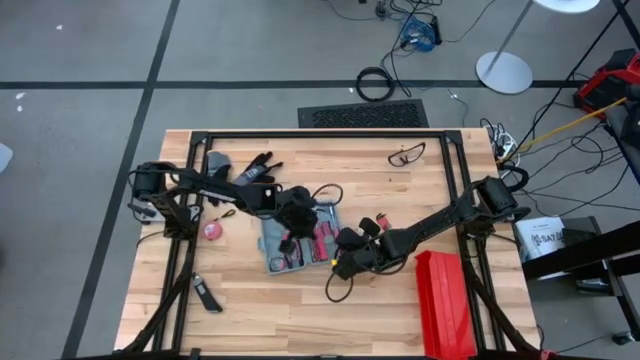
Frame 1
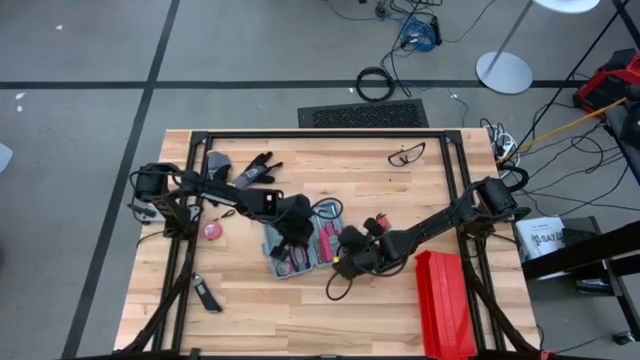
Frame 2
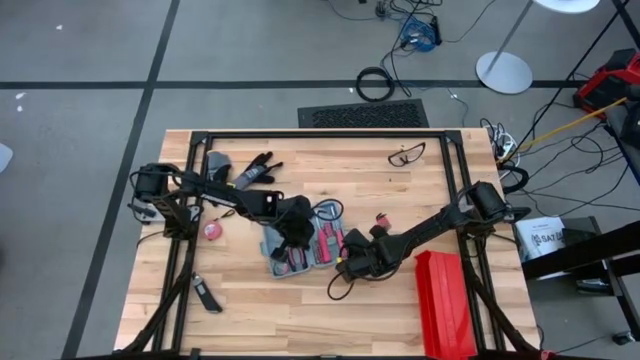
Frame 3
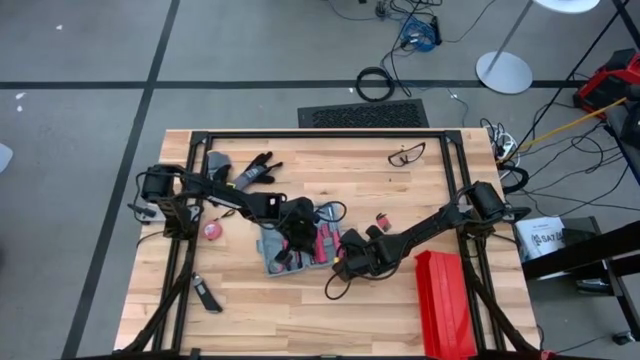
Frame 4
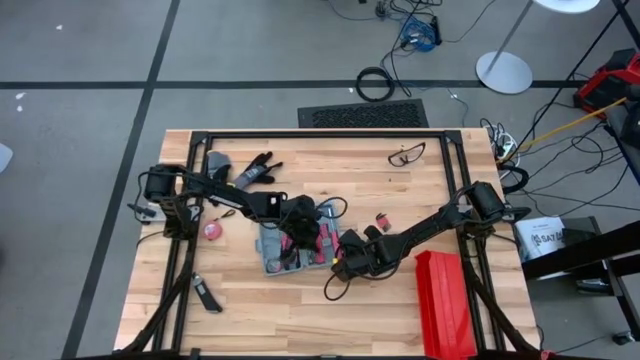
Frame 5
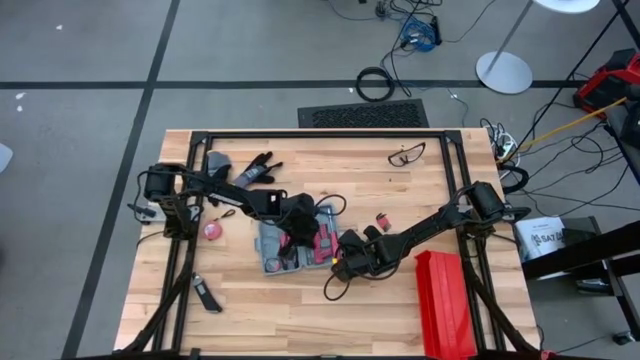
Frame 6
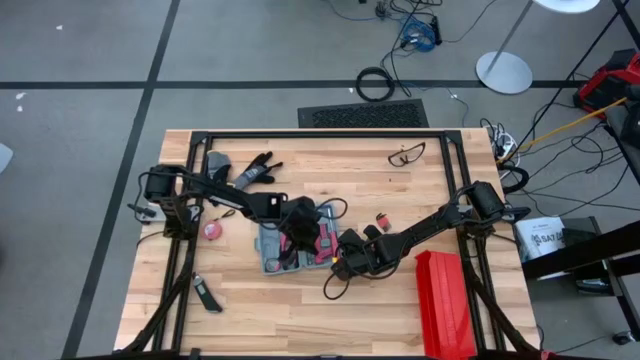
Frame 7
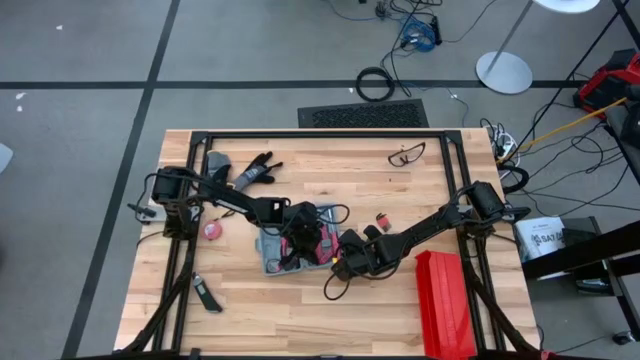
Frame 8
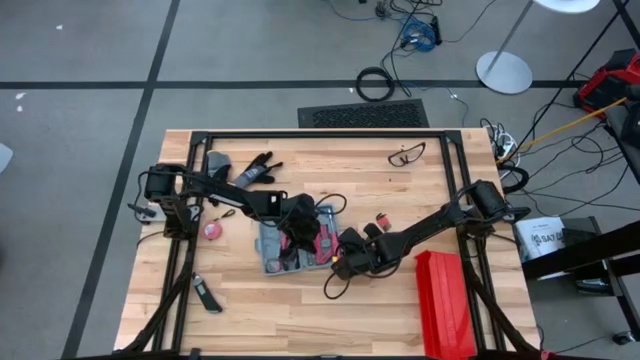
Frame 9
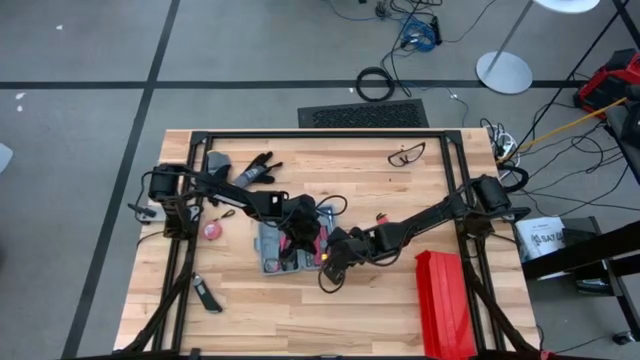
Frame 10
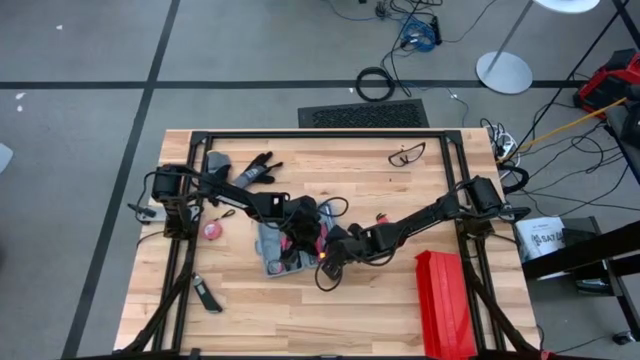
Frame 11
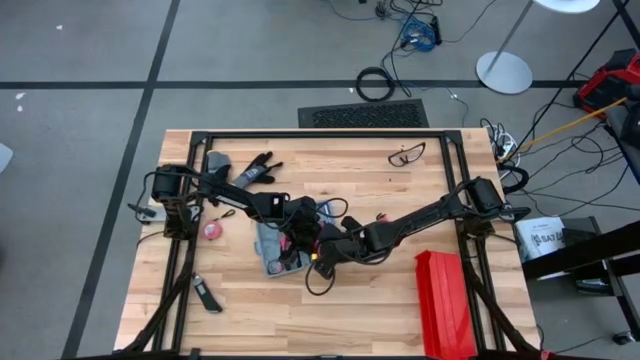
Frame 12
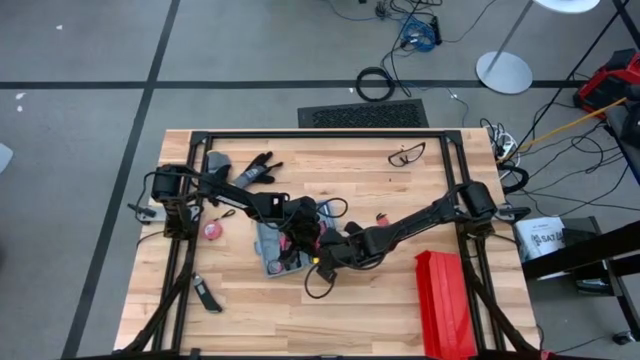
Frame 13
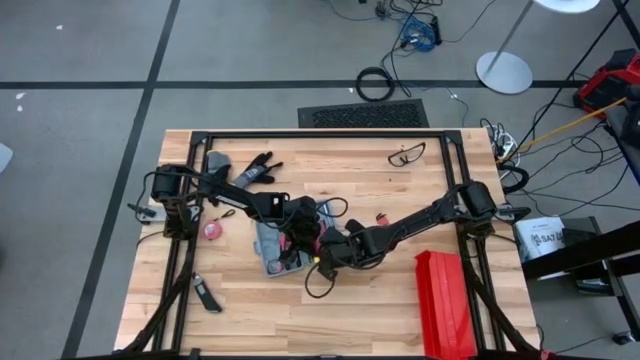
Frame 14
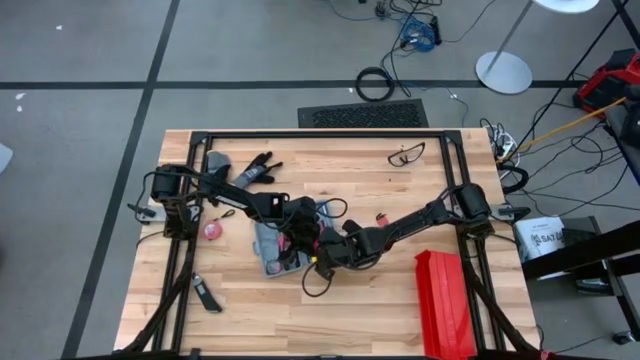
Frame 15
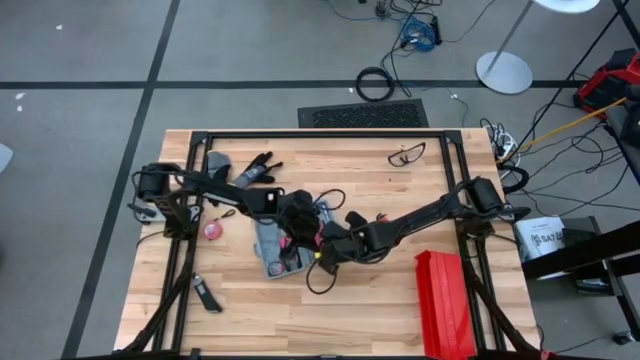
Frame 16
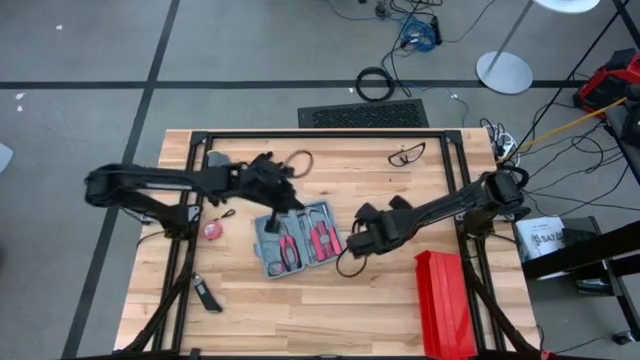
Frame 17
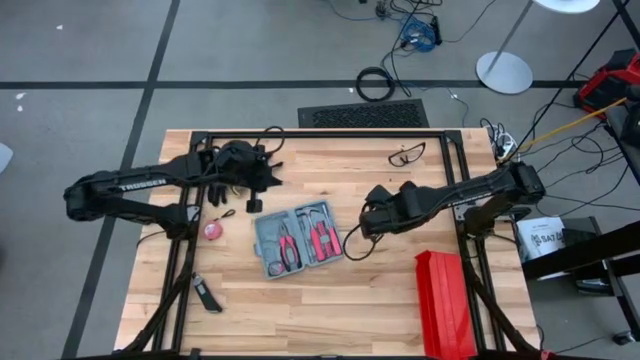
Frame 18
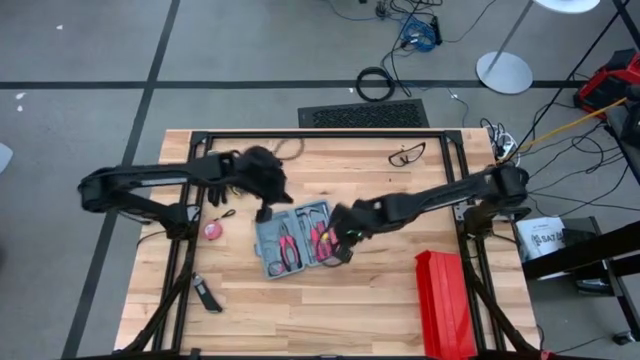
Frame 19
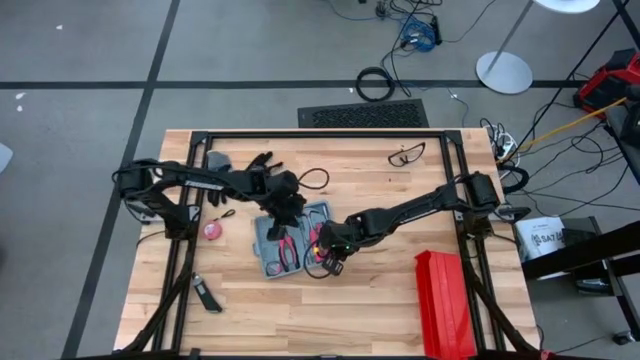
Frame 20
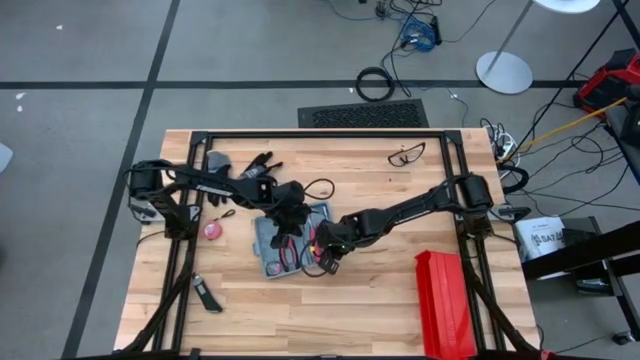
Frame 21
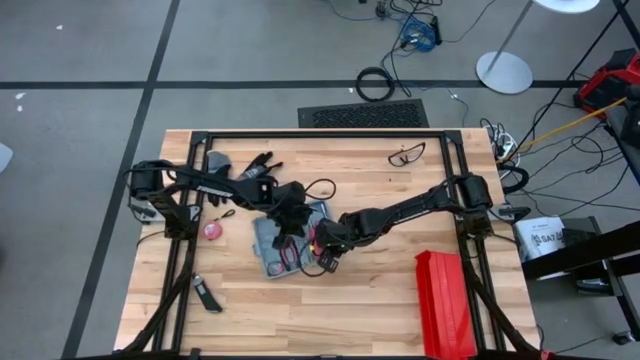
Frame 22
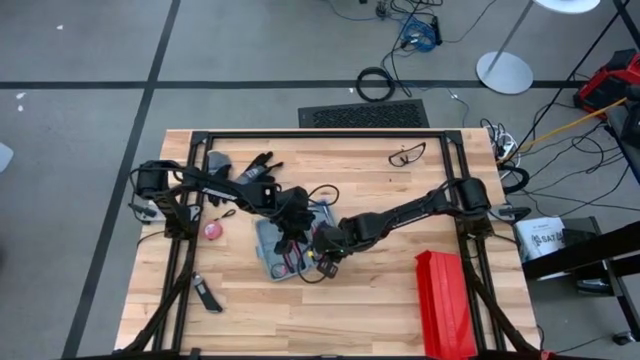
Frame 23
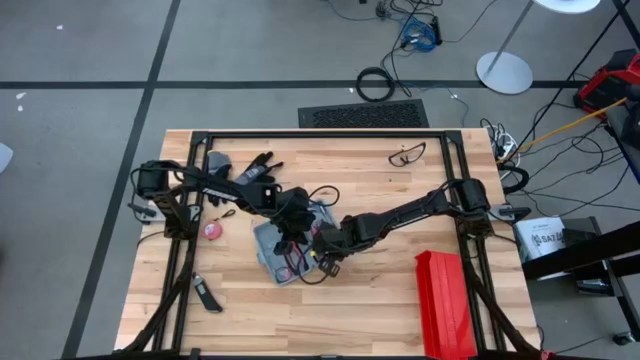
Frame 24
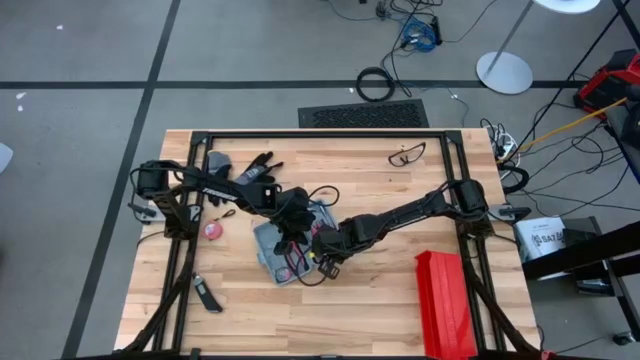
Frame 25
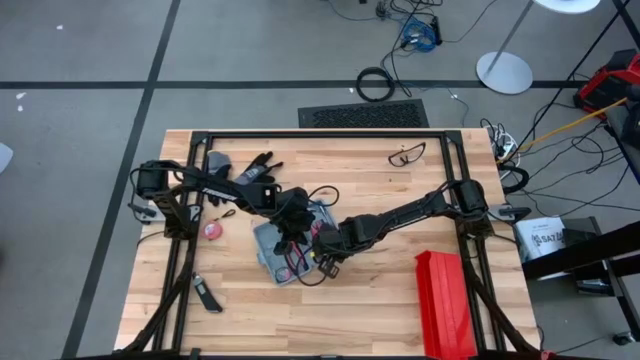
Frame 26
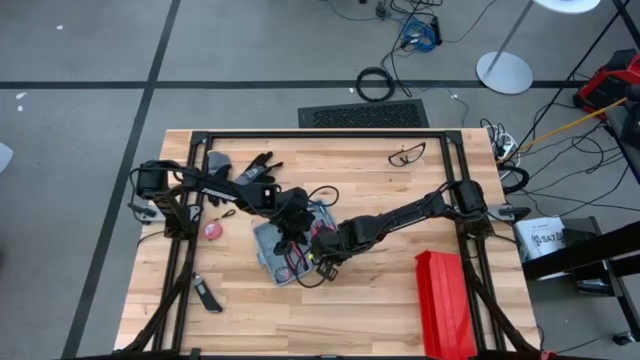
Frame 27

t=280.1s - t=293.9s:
Task: prefit tool cases
Put the red terminal block into the gray prefit tools case

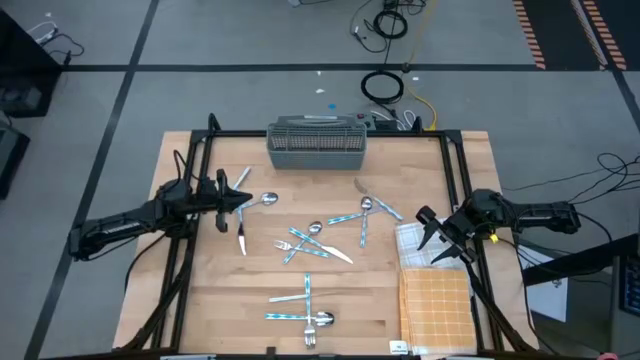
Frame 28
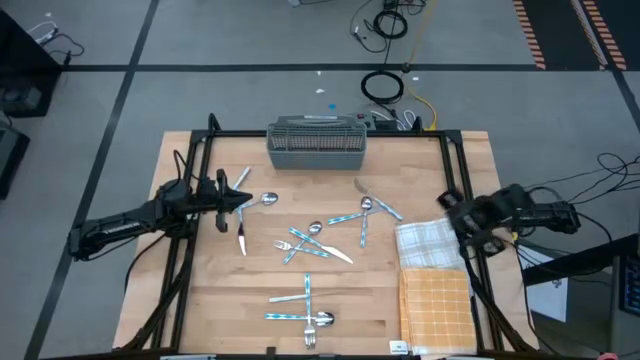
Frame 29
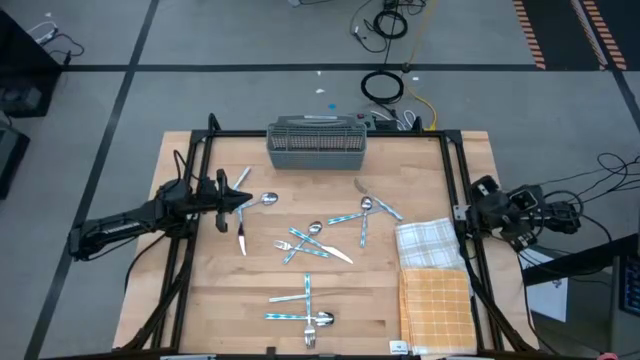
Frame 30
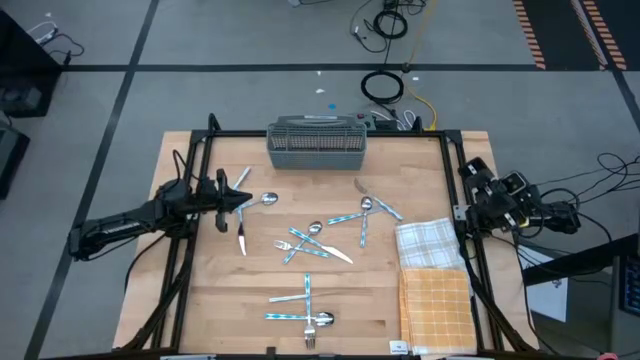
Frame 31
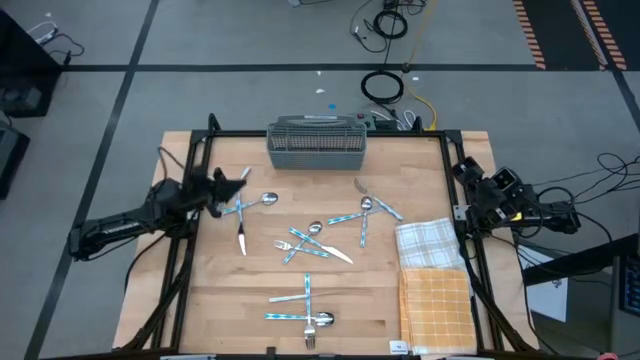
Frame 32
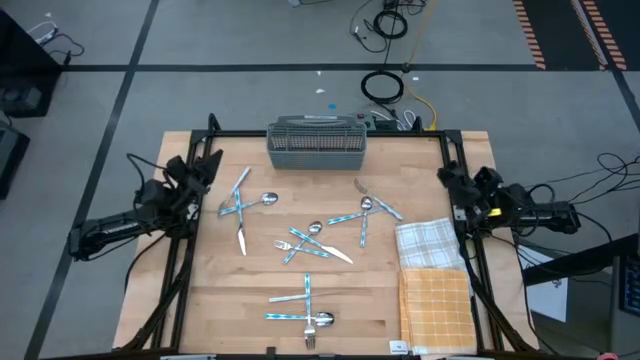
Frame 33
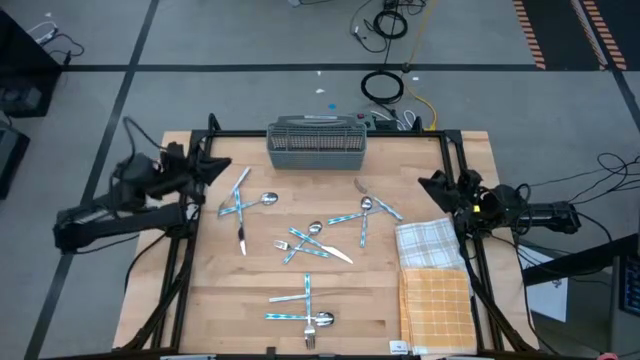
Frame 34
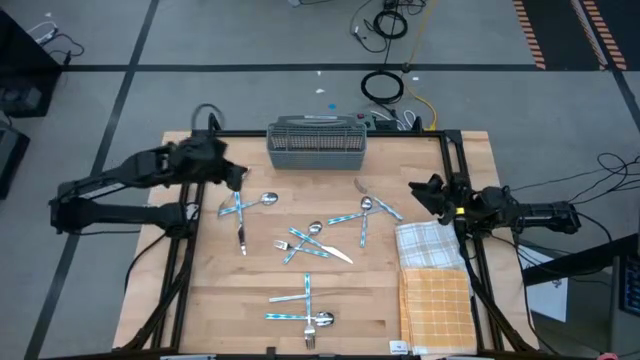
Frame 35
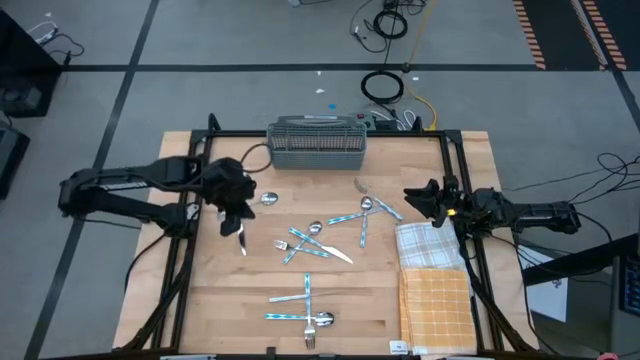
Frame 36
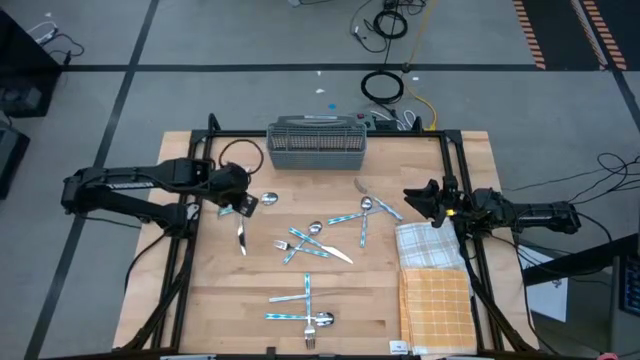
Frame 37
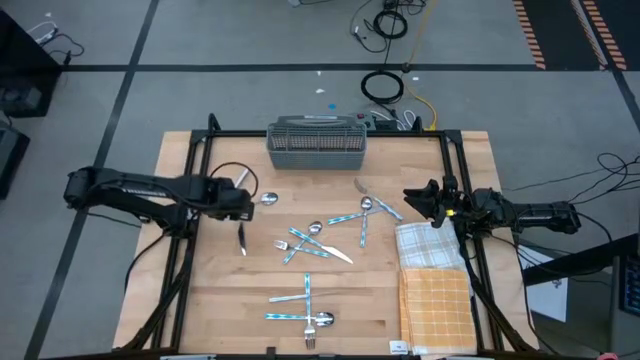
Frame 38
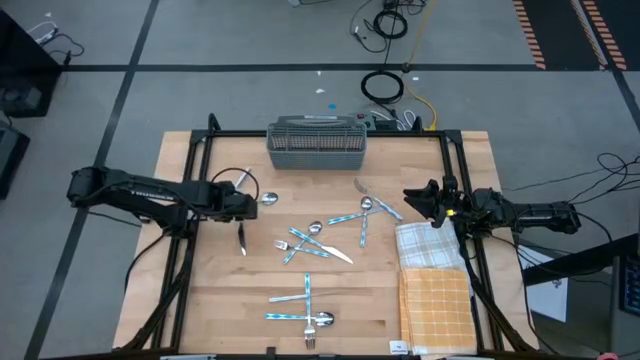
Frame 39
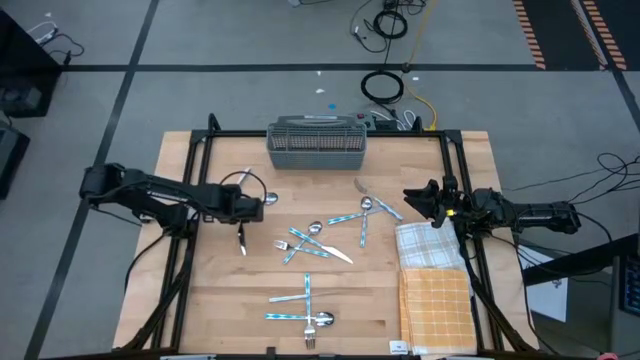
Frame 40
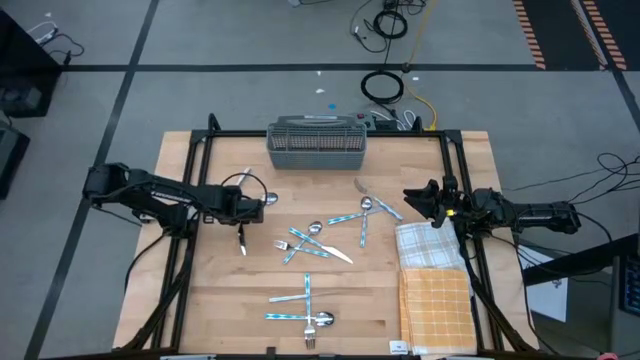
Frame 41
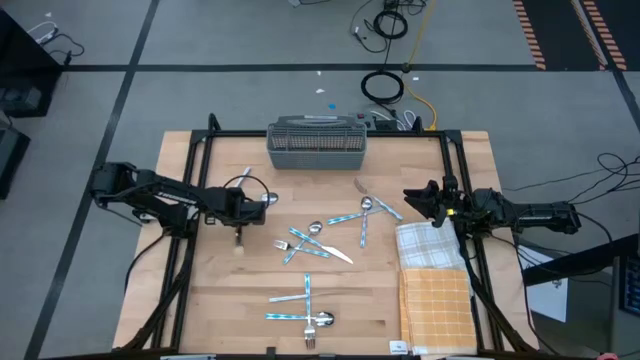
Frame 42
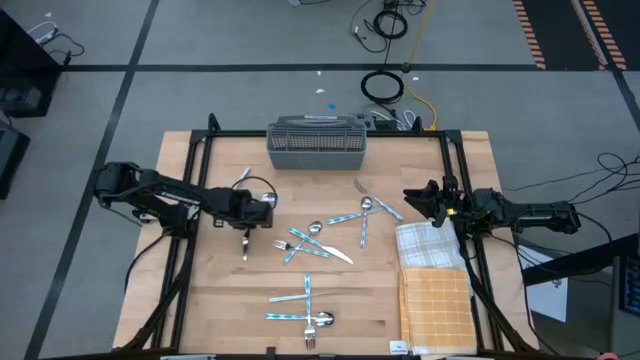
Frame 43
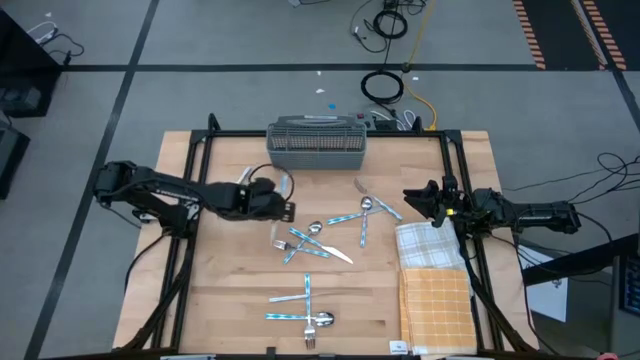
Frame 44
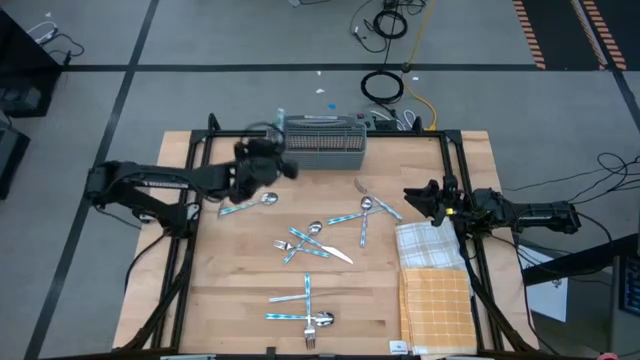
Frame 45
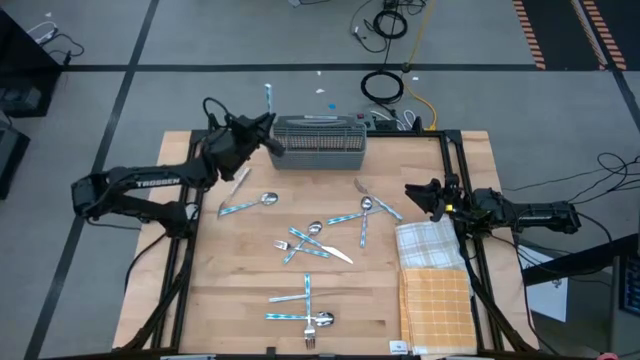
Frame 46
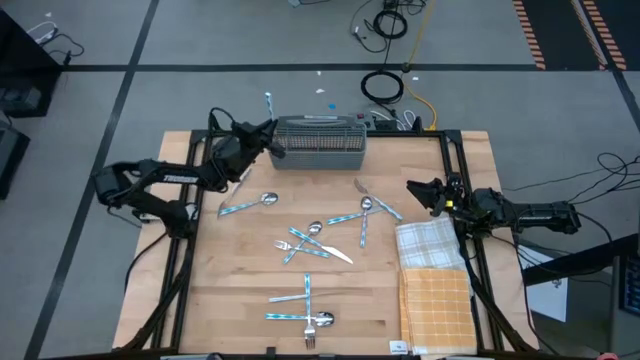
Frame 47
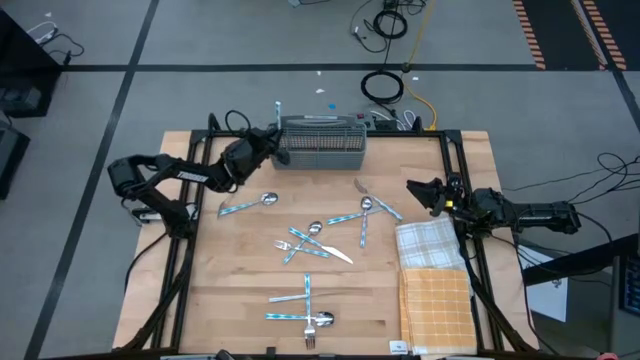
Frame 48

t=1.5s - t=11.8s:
Task: Sort silverware
Put the knife into the left section of the utensil holder
